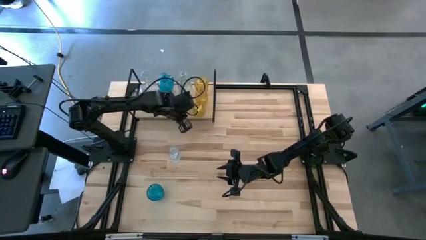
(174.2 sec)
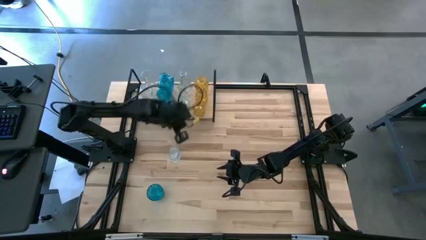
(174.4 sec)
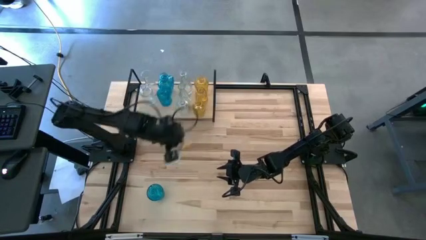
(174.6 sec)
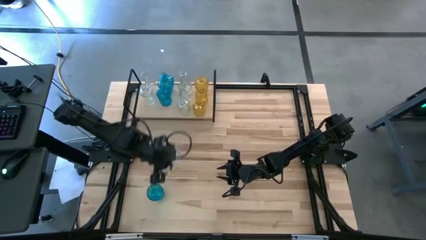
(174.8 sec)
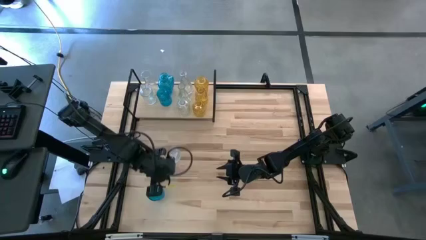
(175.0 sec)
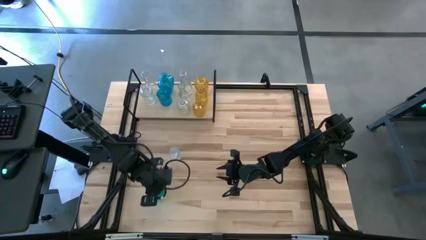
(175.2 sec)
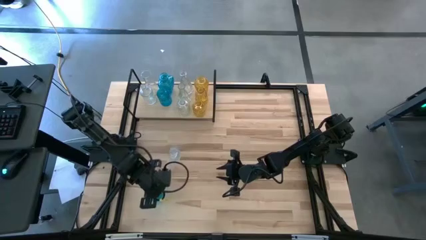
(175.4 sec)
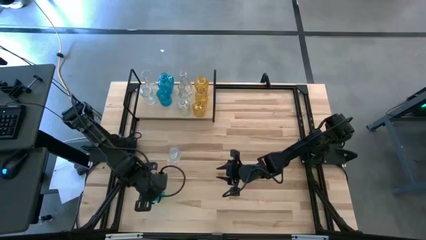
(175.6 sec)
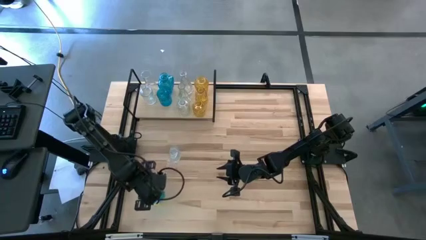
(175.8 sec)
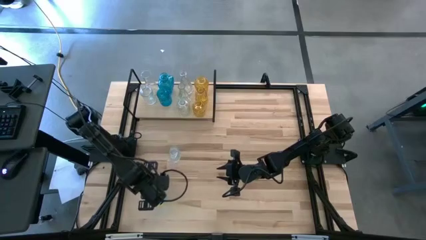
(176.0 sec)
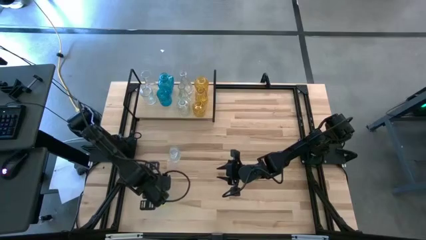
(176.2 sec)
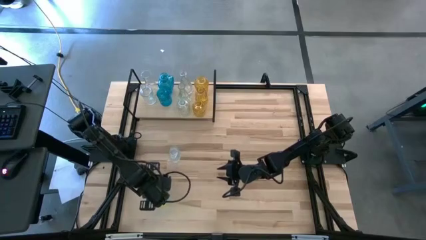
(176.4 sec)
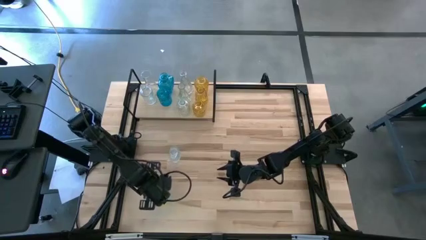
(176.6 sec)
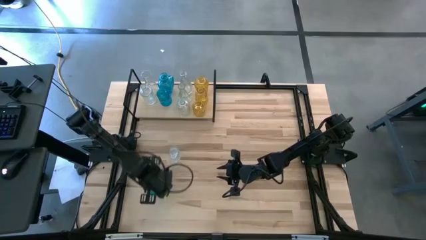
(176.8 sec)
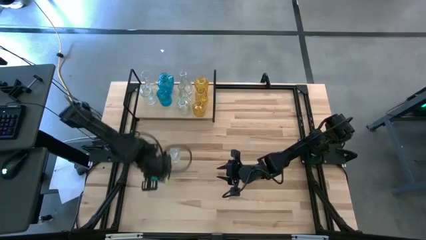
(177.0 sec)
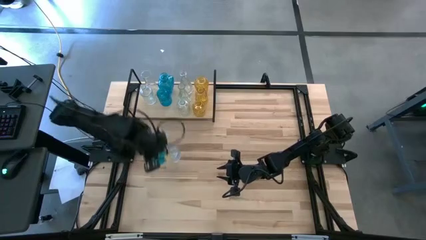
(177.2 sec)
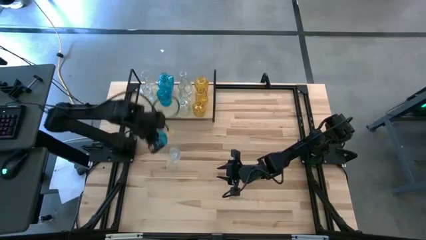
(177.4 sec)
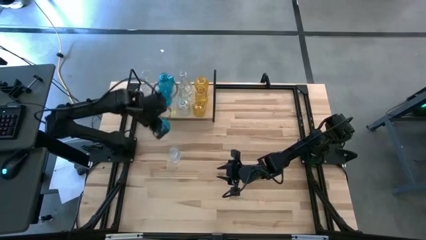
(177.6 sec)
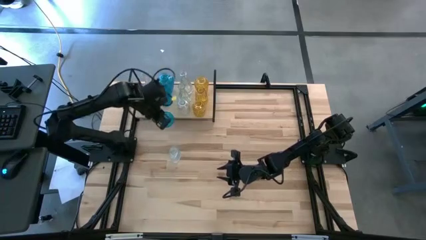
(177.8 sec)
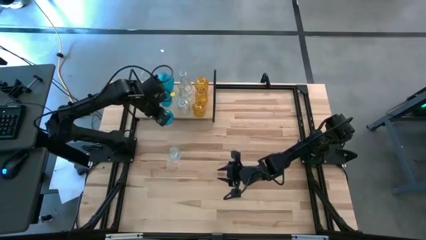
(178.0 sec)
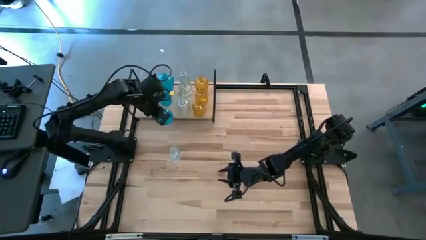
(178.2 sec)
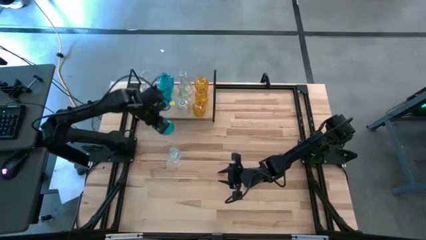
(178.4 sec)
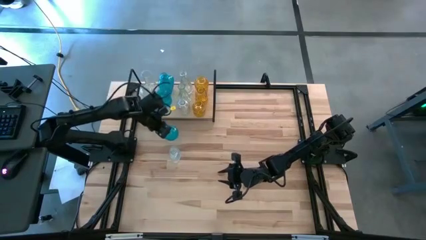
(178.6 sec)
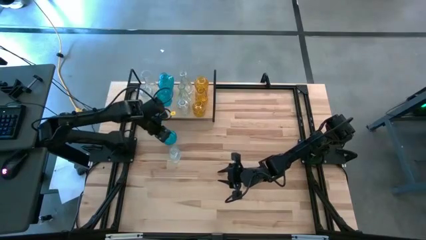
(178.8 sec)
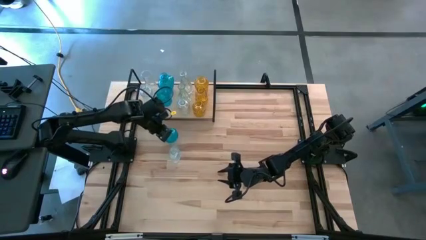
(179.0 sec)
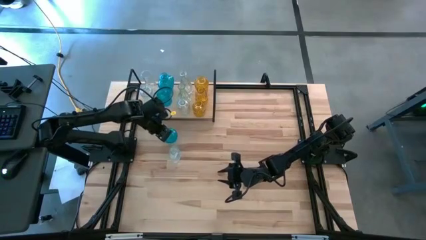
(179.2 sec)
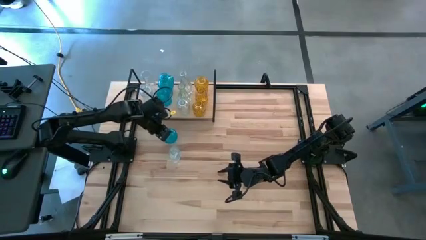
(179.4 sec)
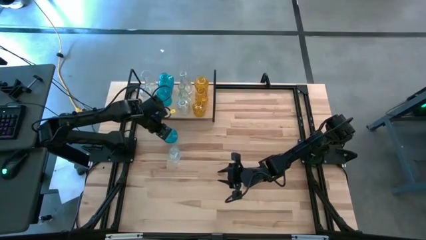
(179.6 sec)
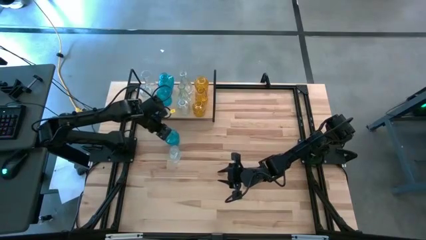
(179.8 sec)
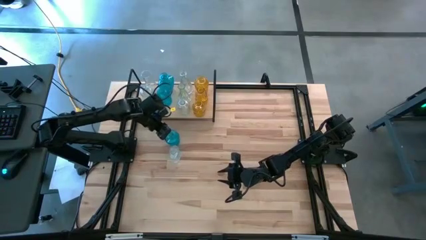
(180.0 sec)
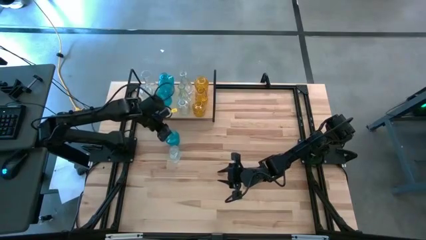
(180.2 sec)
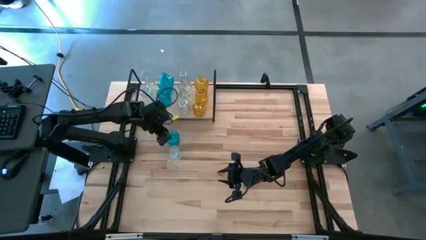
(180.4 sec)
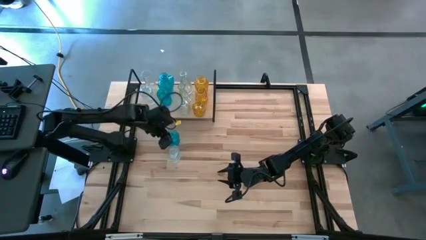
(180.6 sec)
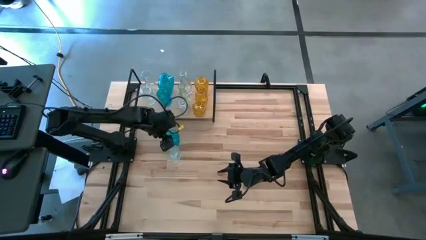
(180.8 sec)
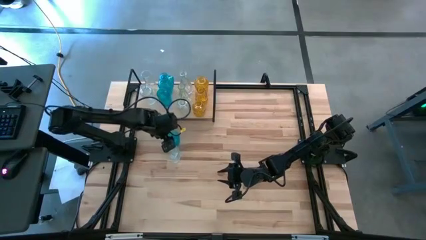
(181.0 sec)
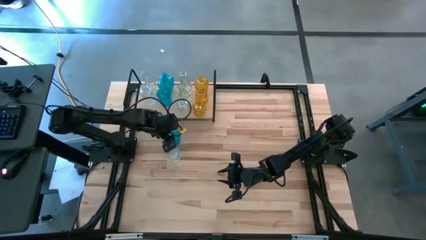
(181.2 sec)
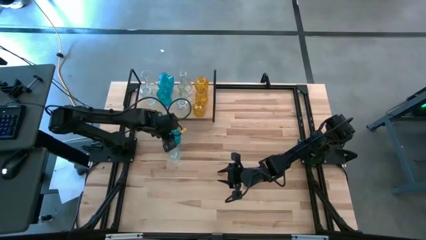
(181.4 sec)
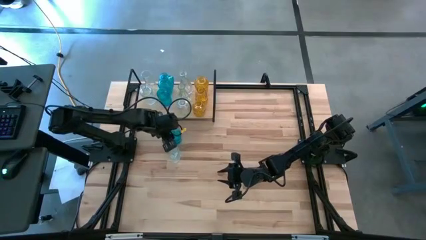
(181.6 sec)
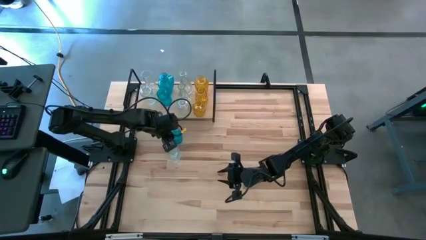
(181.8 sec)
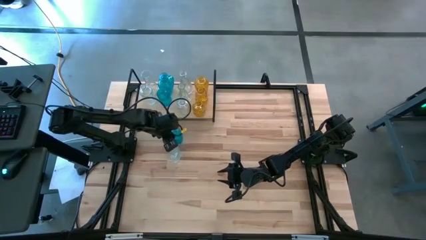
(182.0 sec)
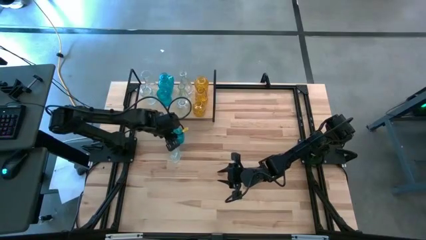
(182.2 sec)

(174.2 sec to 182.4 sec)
Task: sort vases onto shelf
Put the blue vase on the shelf aligned with the other blue vase

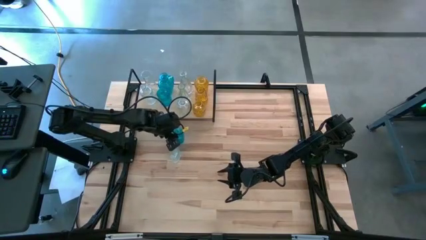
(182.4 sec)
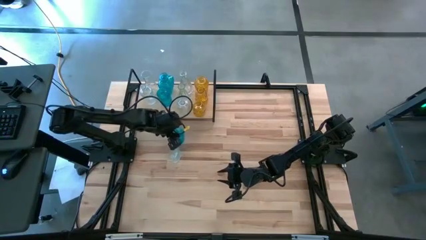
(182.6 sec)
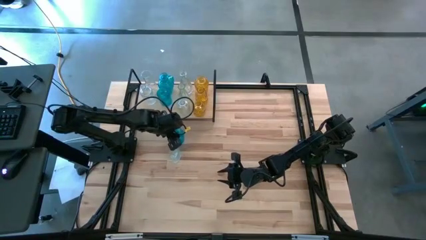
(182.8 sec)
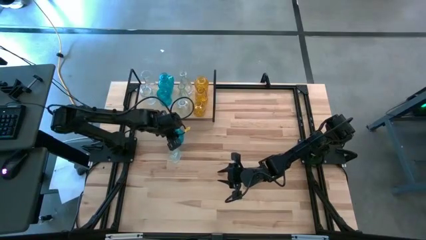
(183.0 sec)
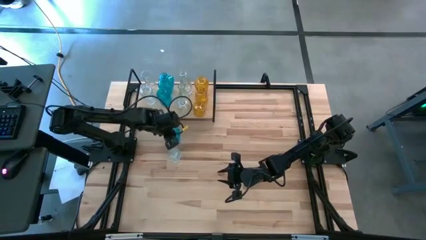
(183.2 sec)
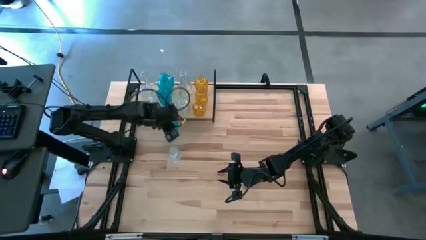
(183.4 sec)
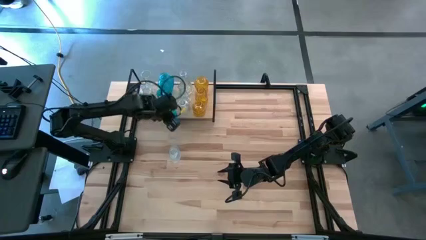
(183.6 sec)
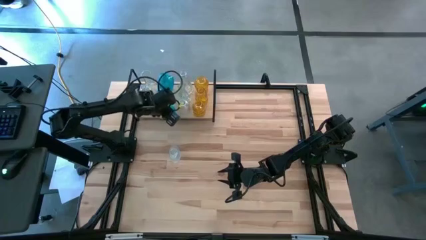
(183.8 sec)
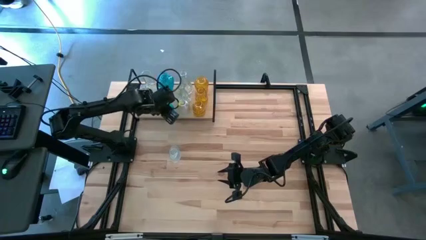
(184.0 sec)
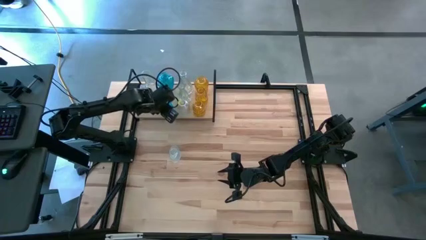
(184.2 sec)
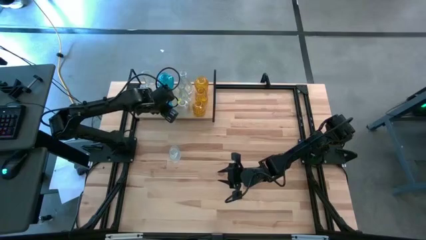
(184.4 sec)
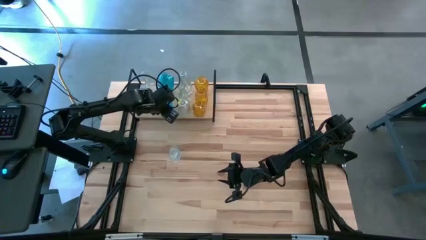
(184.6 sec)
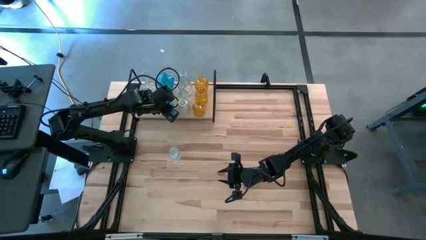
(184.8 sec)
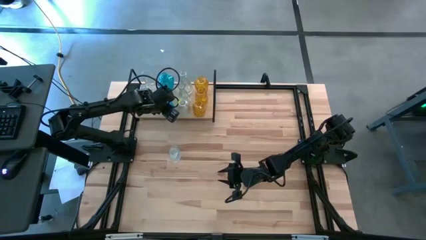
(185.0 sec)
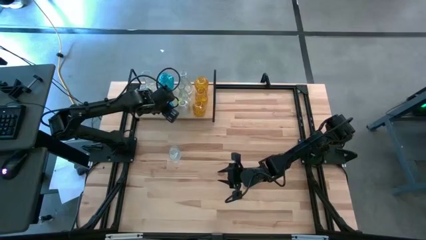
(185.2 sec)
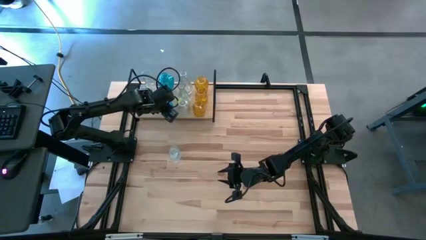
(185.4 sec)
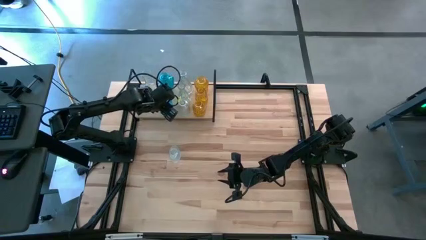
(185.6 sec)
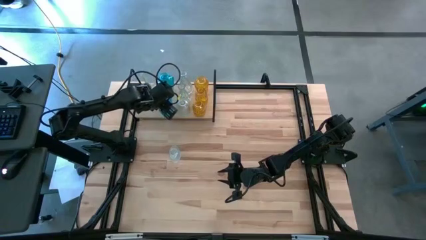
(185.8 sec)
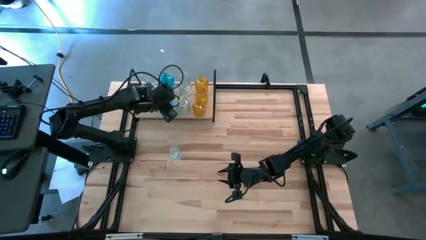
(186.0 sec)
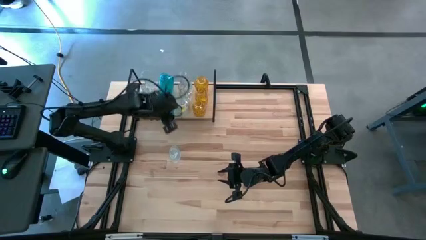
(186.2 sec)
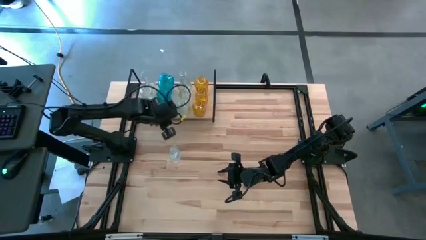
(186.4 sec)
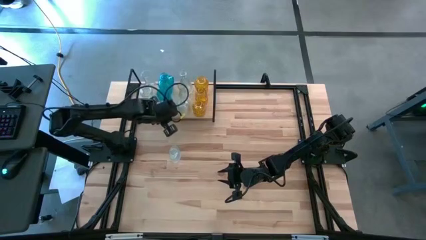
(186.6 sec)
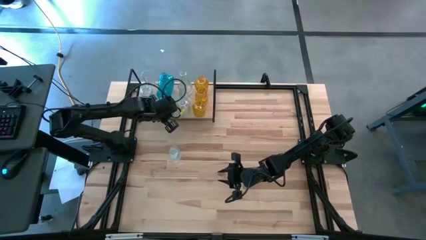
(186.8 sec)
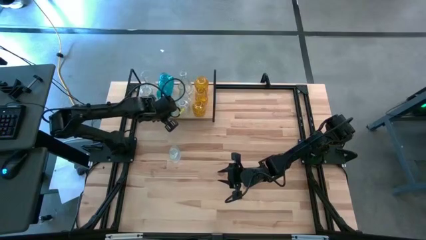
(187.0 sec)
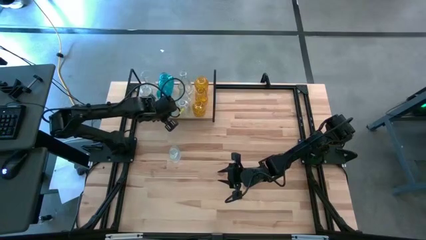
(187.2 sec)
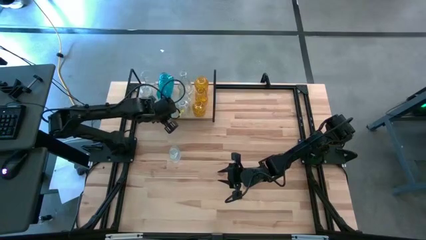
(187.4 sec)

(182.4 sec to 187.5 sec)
Put the blue vase on the shelf aligned with the other blue vase

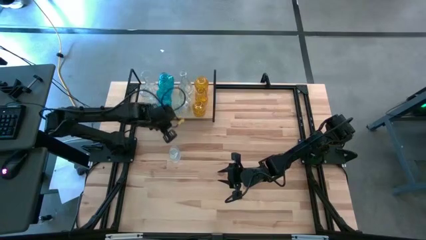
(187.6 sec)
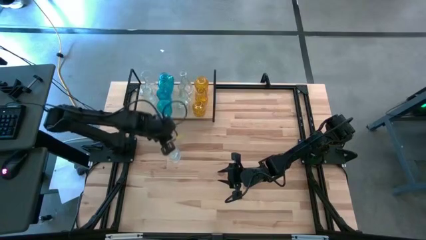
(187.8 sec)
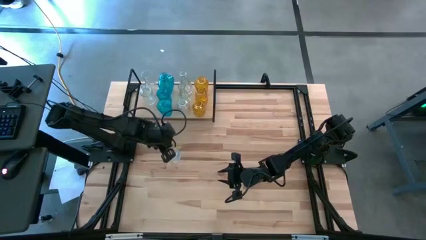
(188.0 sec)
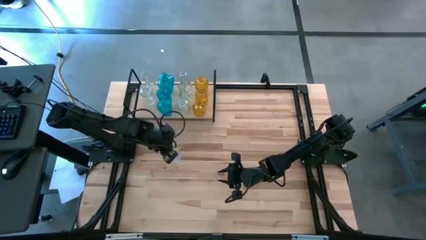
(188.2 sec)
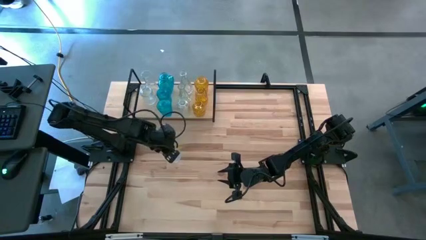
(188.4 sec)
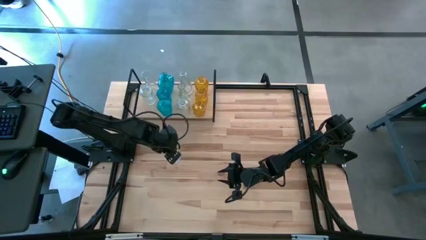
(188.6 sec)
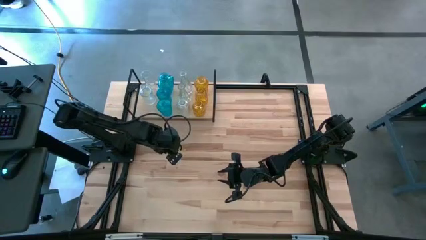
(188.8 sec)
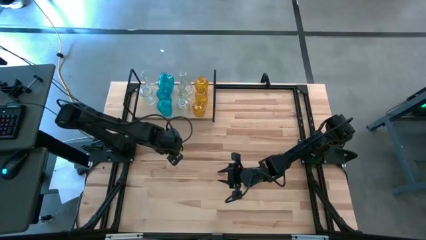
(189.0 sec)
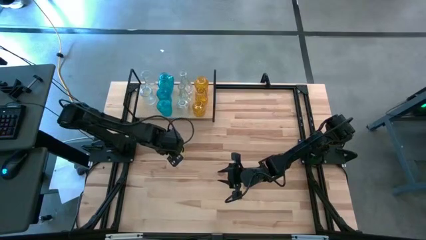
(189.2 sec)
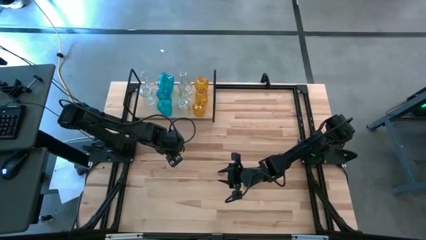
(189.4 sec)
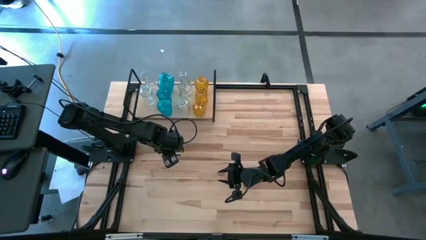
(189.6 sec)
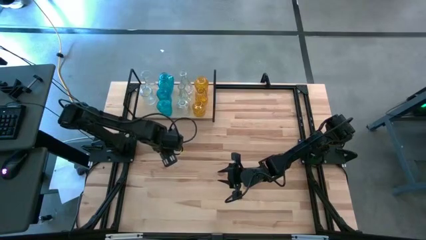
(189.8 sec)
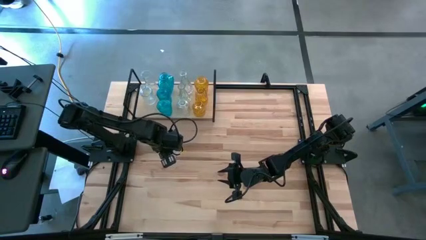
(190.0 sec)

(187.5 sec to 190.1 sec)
Put the transparent vase on the shelf aligned with the other transparent vase
